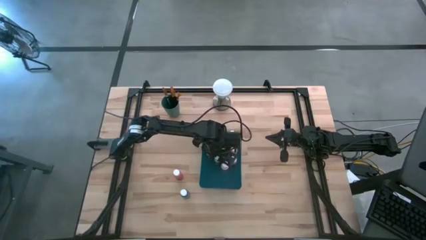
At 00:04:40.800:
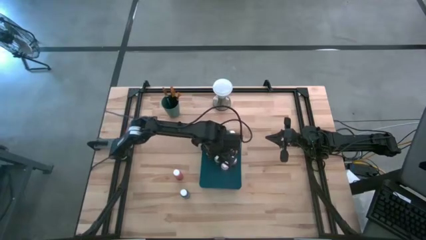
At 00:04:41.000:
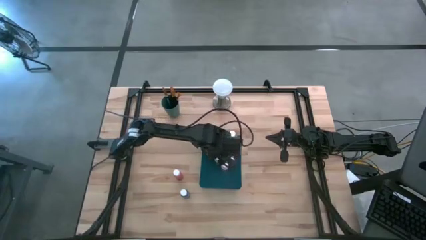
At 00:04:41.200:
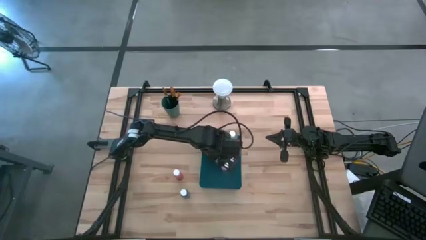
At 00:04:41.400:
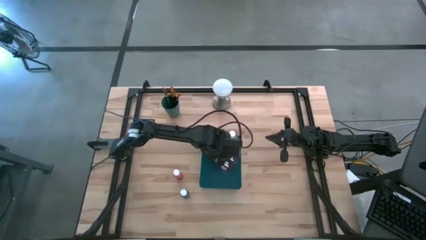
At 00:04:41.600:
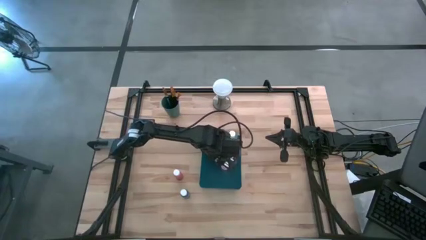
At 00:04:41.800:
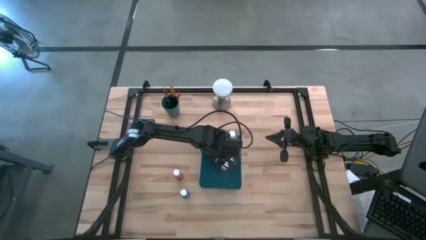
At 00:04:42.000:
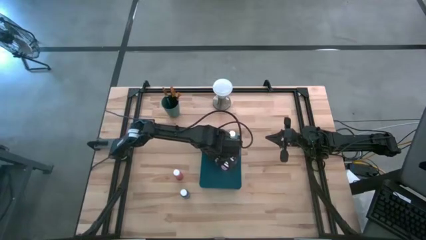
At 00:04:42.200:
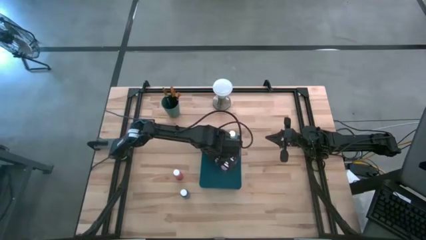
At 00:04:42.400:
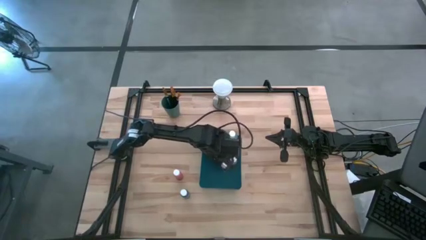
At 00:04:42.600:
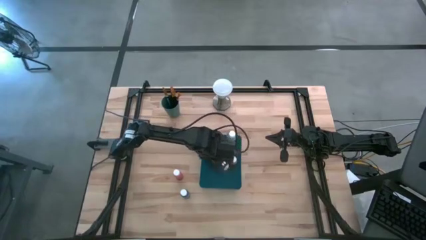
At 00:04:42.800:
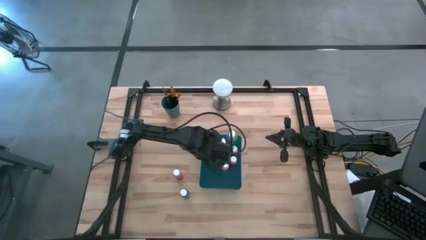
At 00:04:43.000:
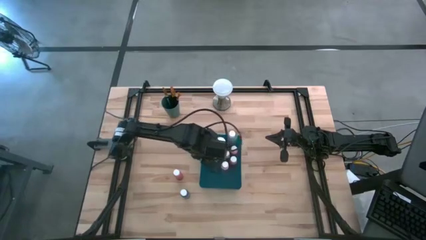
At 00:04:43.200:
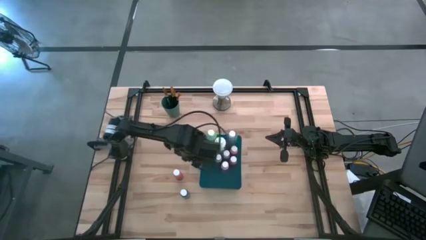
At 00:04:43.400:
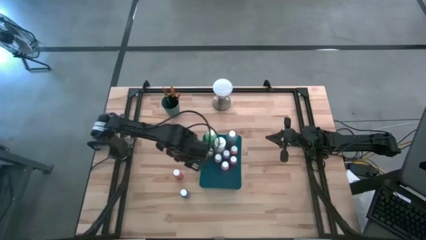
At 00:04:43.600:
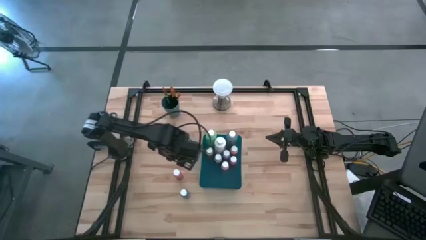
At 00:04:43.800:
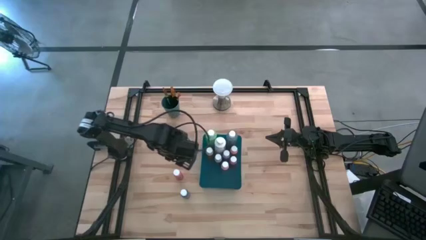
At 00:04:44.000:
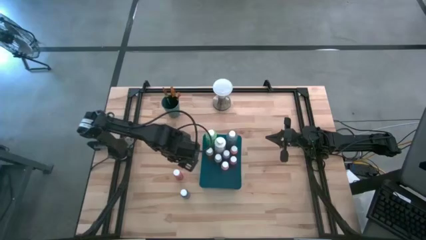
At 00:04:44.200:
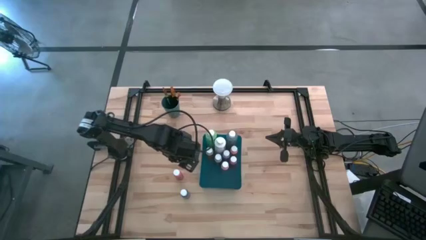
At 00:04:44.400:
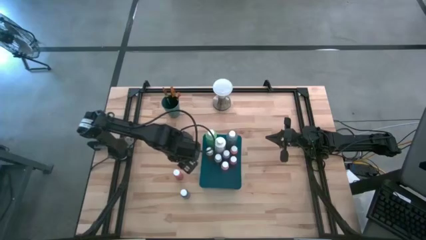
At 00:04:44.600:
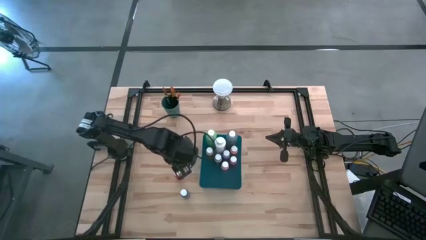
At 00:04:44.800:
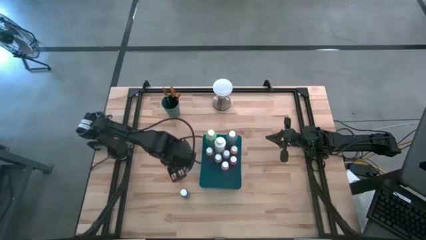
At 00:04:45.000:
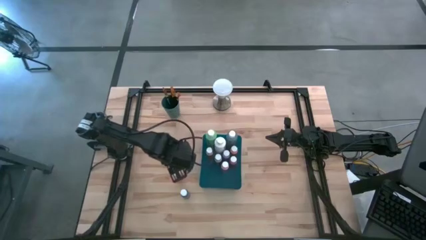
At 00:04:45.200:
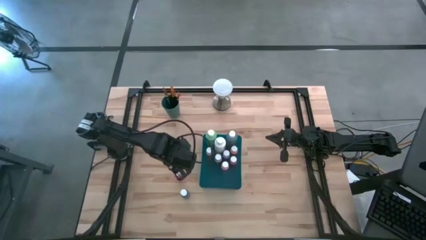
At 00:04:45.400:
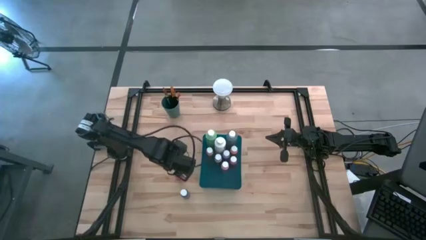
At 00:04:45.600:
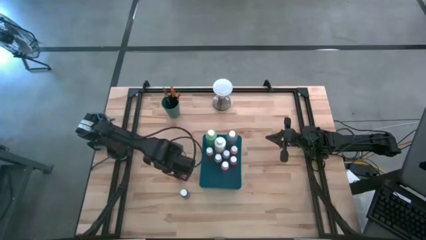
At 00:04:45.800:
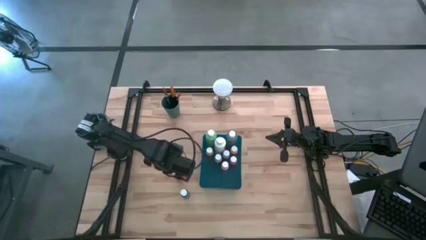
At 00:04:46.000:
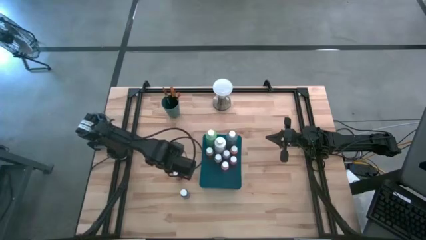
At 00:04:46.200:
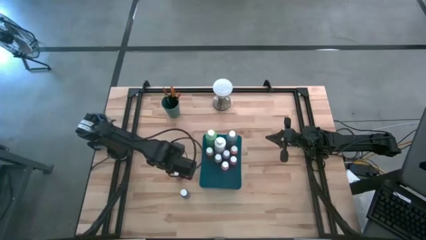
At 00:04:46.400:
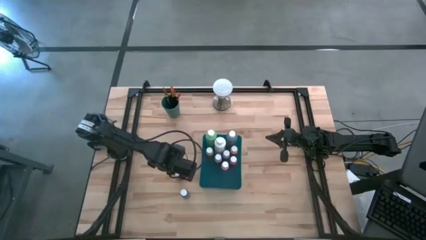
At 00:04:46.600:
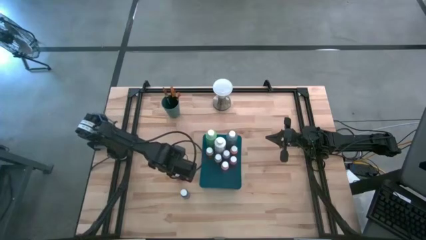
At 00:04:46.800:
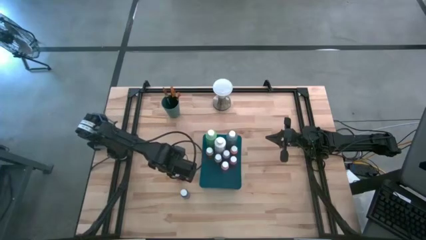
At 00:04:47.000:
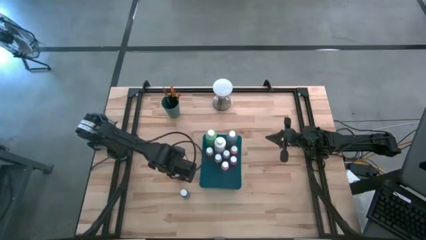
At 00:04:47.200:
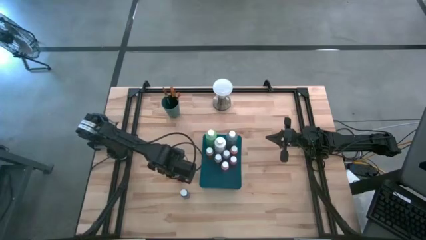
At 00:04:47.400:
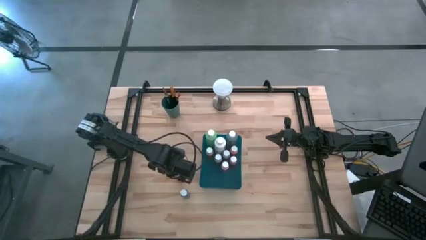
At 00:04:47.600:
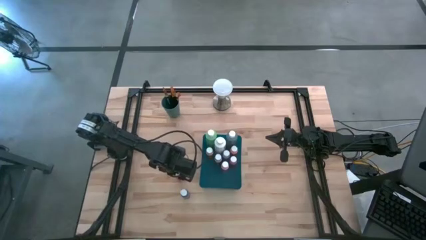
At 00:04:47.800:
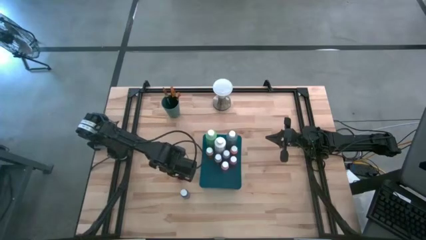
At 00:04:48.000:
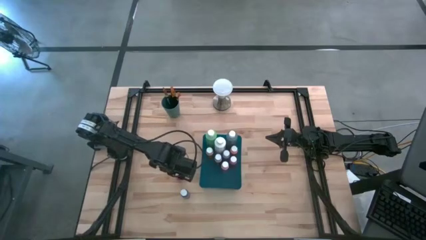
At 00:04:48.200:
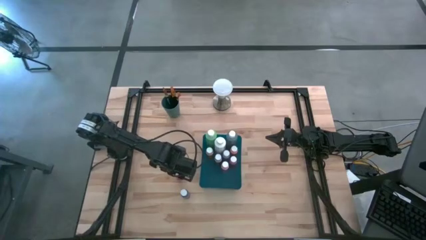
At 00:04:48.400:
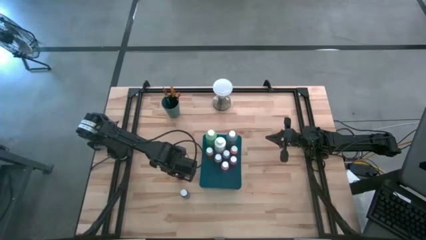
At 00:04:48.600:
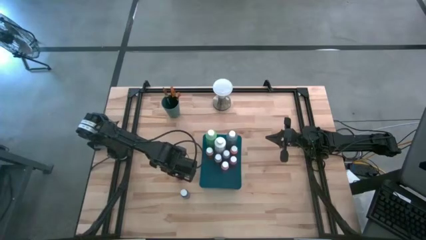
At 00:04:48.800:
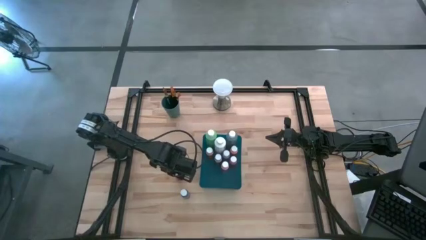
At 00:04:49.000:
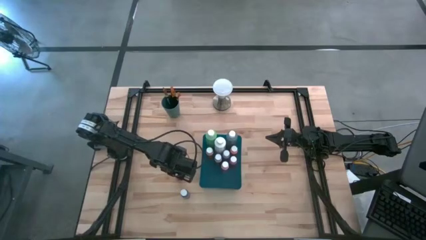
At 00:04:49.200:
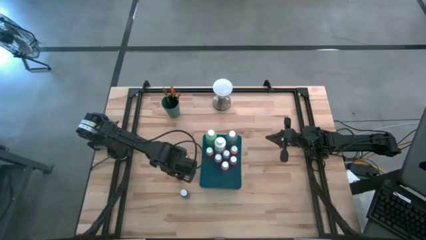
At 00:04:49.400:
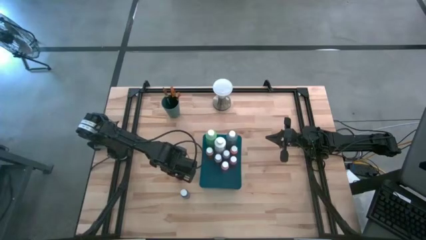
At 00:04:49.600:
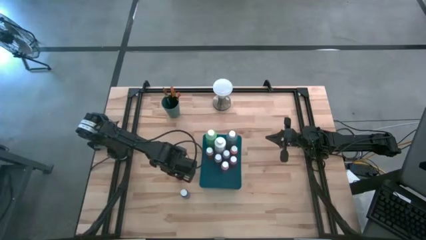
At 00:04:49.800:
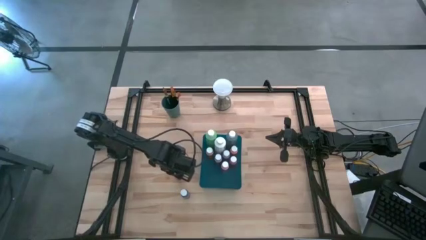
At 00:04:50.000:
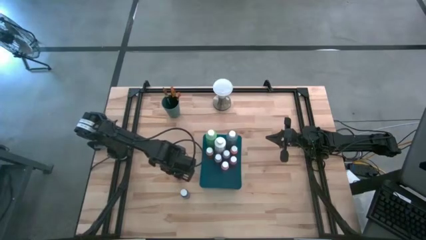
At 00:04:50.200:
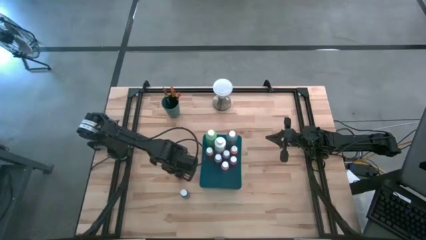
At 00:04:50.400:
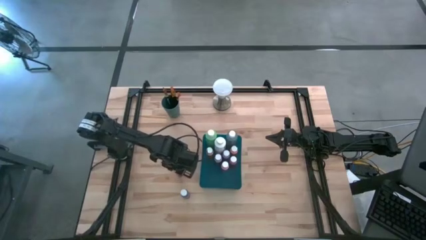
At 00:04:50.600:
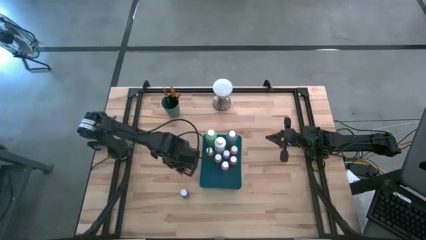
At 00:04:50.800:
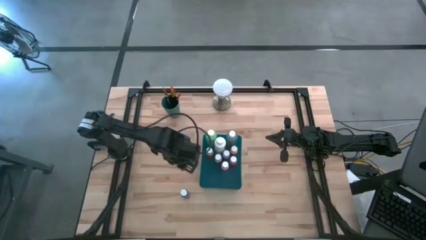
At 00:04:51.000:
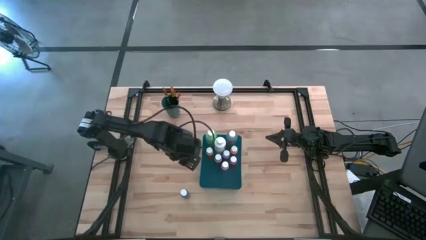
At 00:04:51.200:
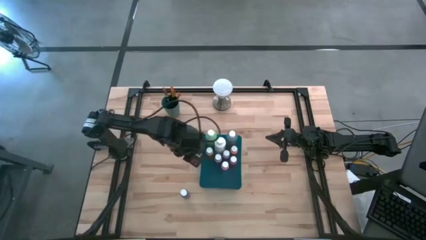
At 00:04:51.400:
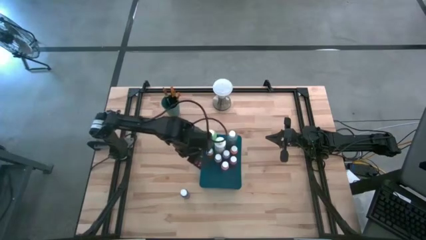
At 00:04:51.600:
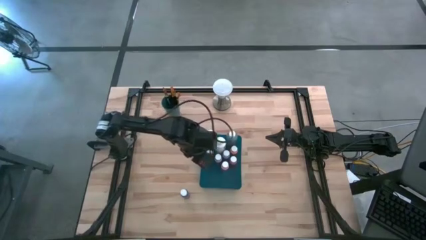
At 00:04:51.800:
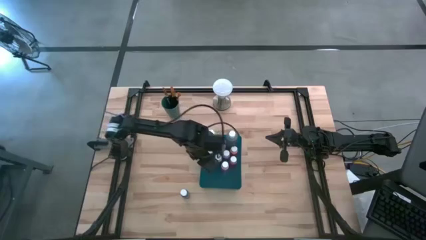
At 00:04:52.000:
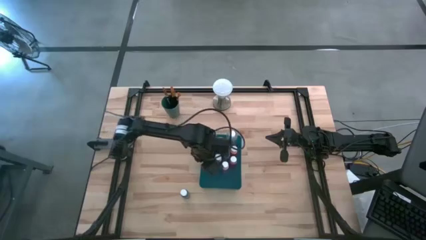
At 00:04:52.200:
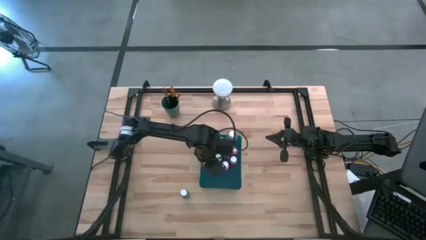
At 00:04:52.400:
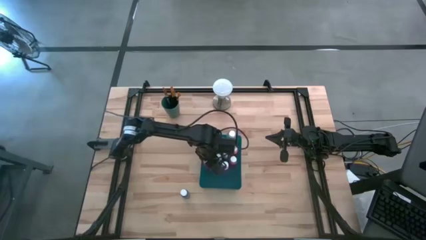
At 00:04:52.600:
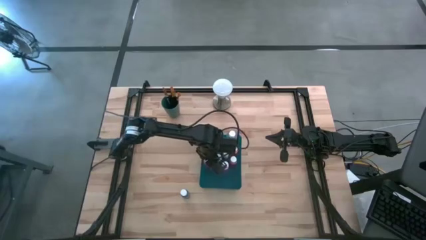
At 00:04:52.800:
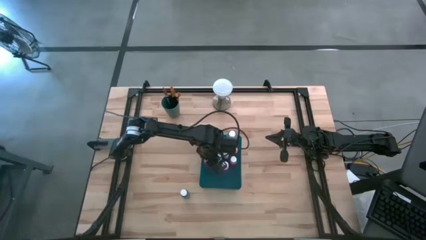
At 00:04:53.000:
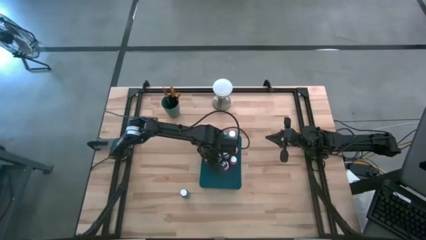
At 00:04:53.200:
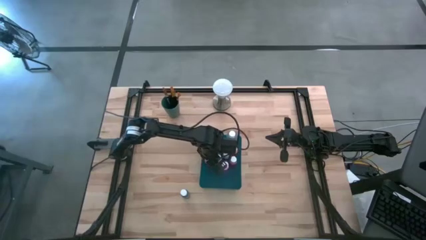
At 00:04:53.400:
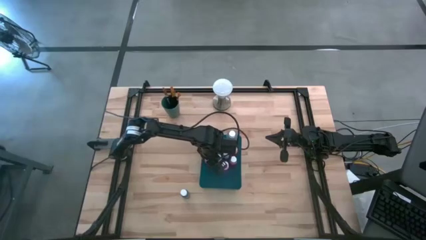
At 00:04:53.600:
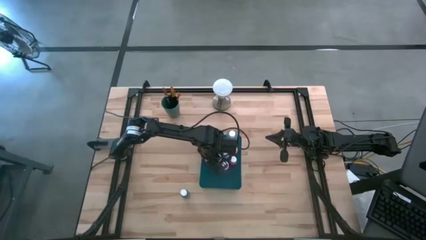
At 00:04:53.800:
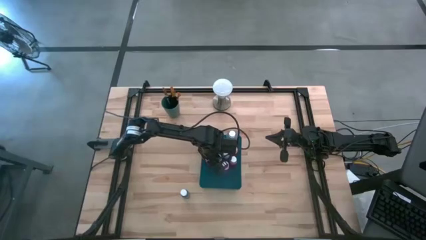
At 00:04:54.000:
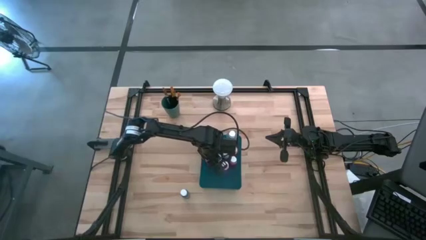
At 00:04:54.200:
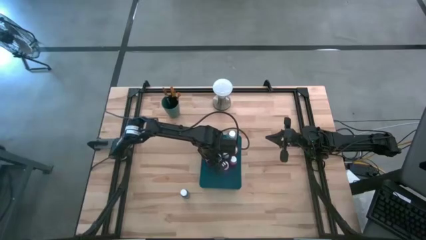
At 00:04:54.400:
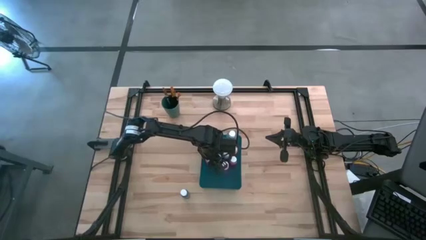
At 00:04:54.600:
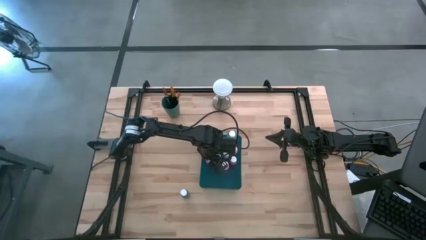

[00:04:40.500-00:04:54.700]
Task: Pick & Place Paint Supplies
Put the orange paint bottle into the blue bin

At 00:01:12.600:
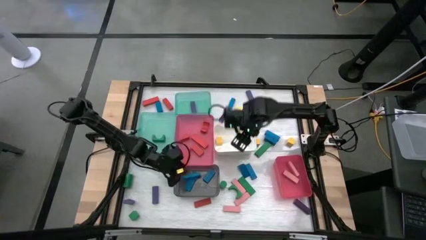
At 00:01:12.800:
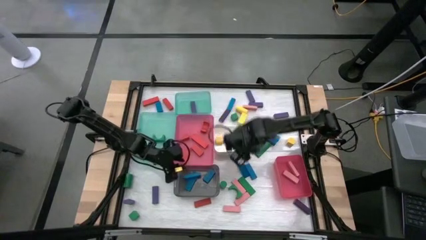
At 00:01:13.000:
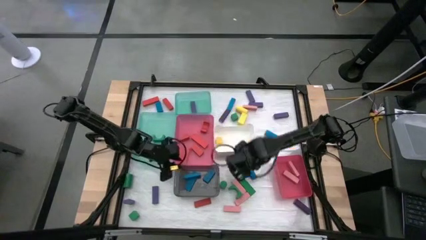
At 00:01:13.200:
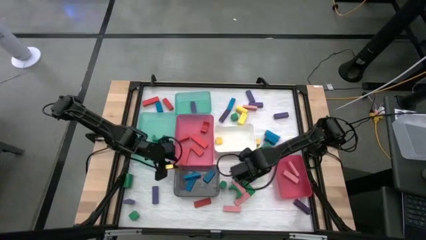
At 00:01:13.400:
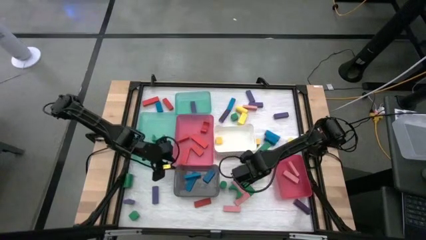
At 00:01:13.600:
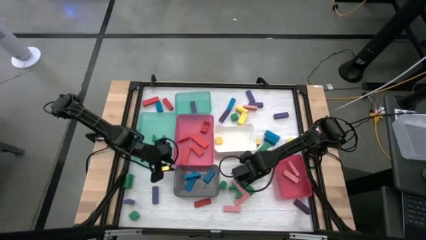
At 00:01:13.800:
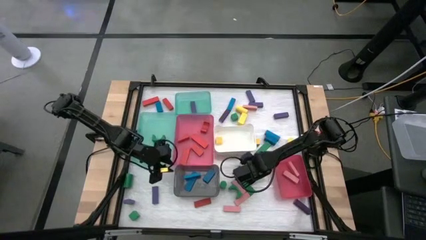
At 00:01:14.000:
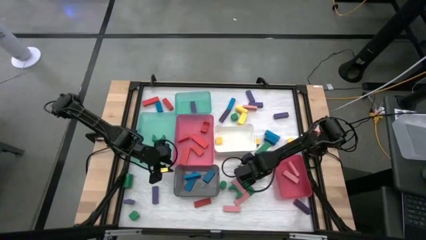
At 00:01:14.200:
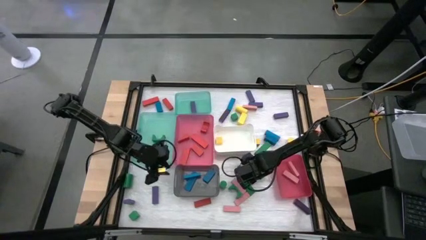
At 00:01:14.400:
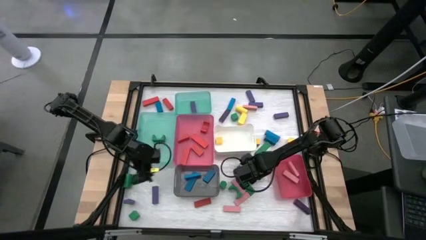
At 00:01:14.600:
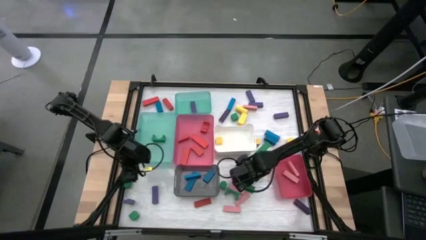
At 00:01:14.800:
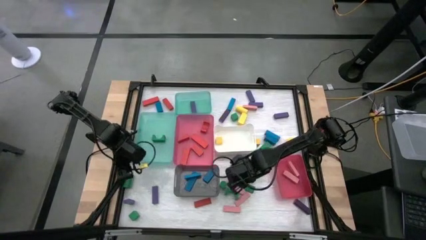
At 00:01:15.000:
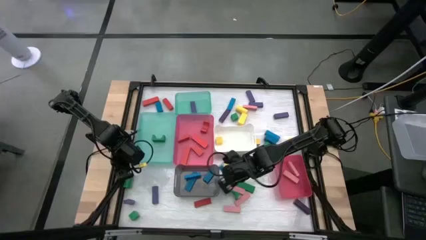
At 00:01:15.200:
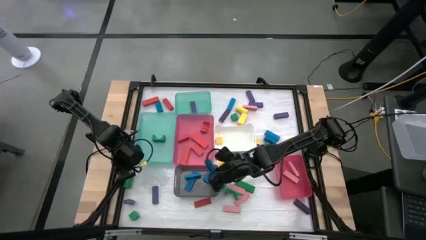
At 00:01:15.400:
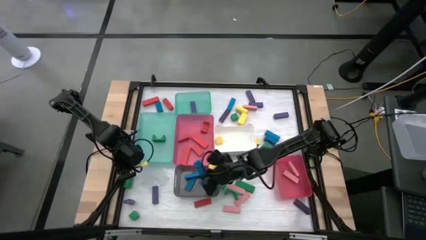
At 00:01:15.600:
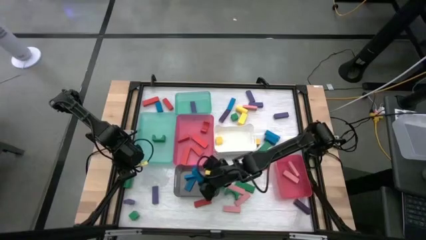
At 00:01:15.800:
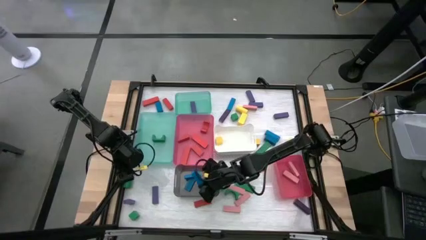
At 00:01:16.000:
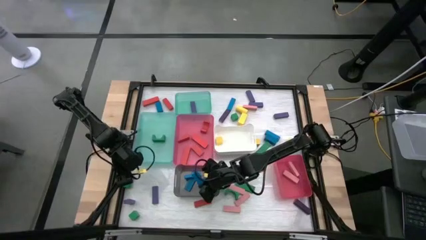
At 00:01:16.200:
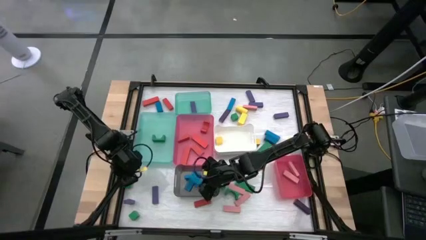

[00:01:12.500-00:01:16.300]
Task: Sort blocks
Put the blue block into the black transparent bin
